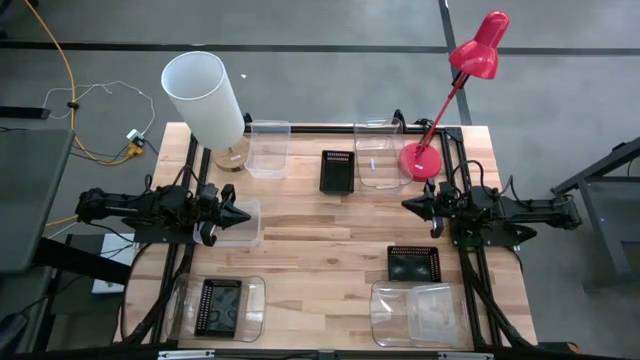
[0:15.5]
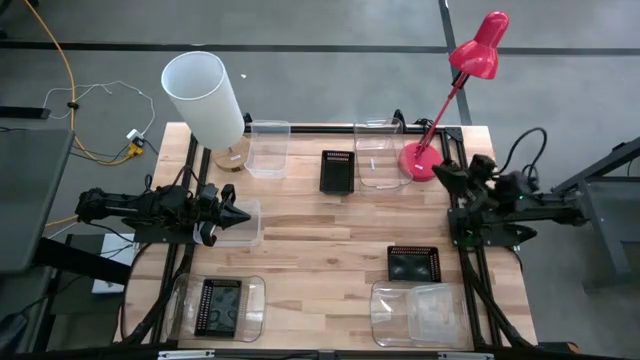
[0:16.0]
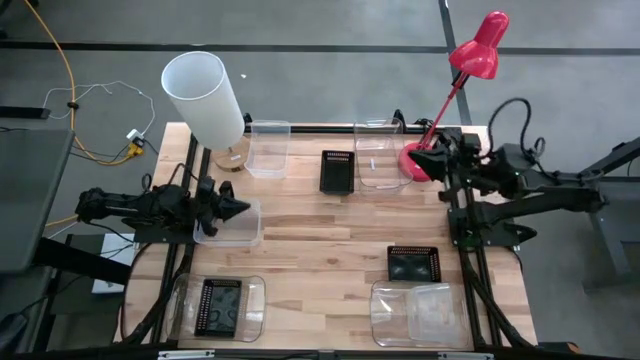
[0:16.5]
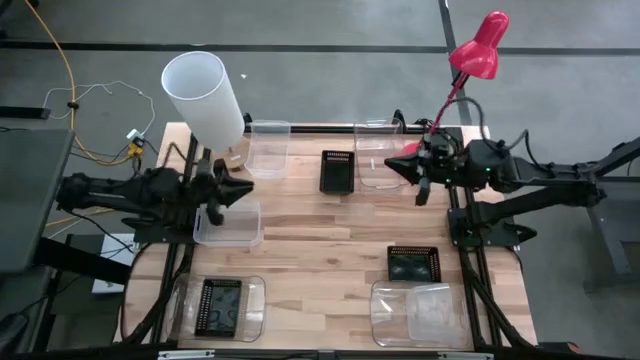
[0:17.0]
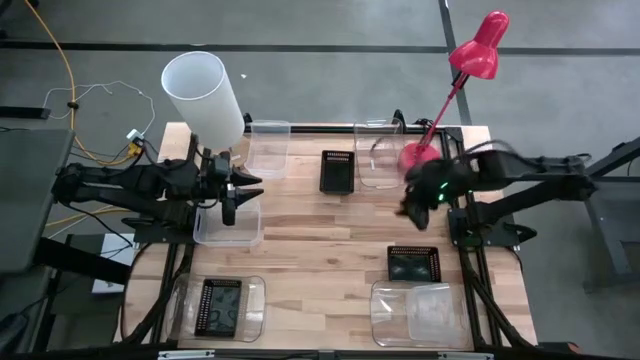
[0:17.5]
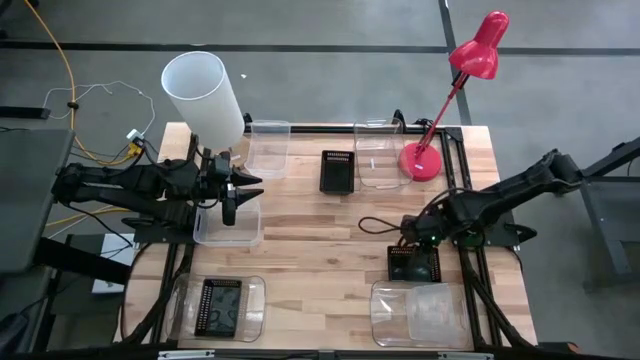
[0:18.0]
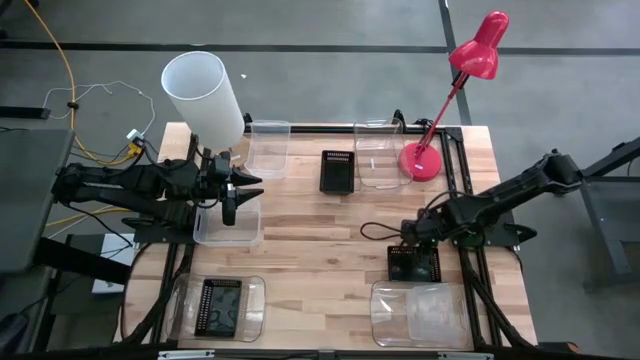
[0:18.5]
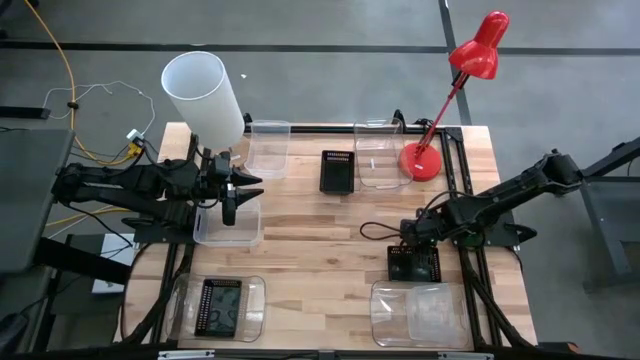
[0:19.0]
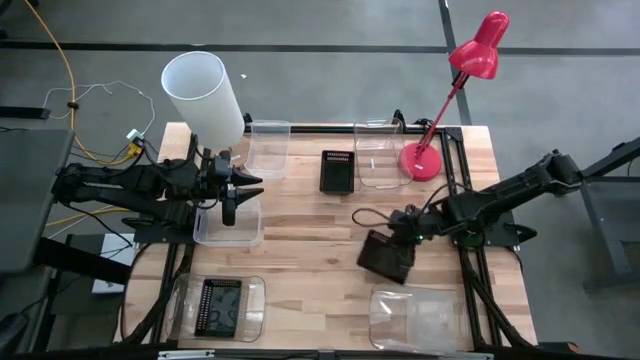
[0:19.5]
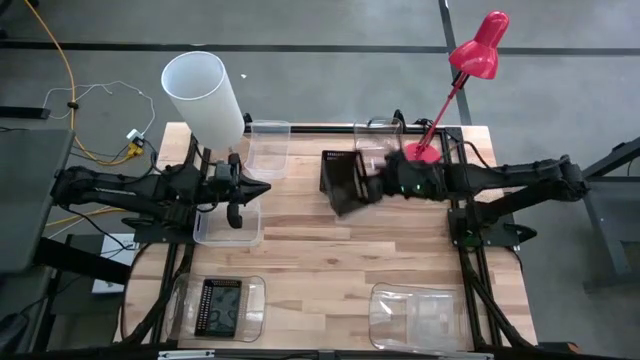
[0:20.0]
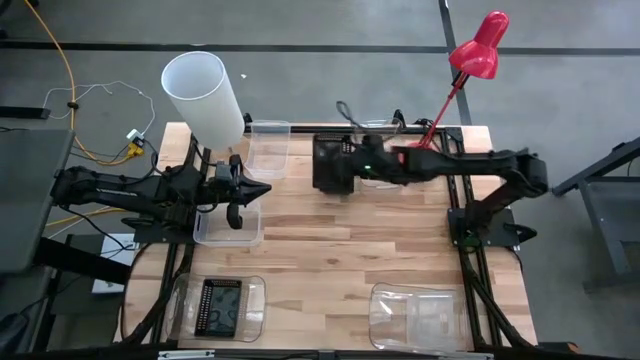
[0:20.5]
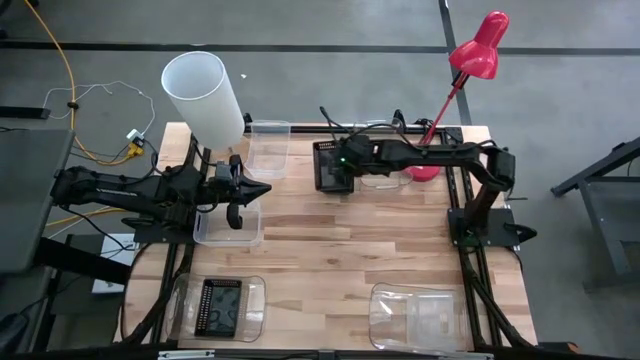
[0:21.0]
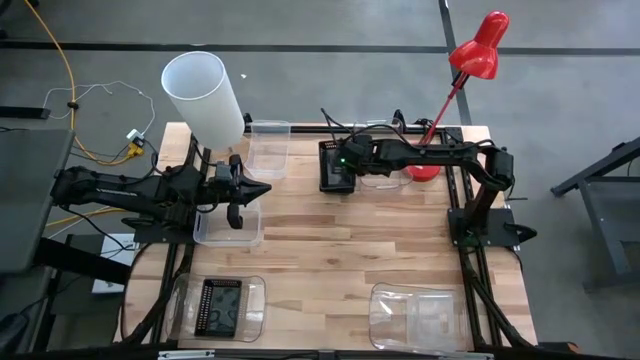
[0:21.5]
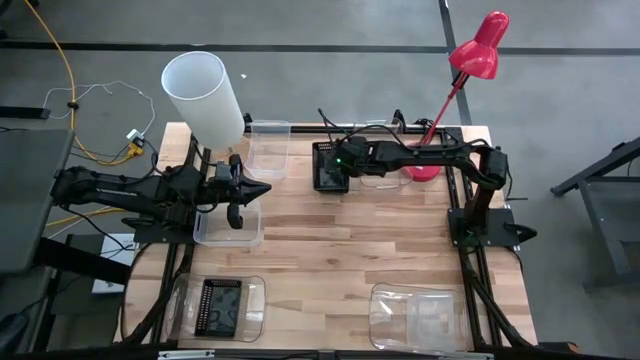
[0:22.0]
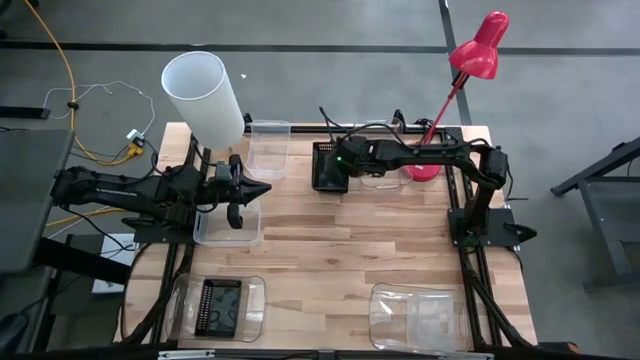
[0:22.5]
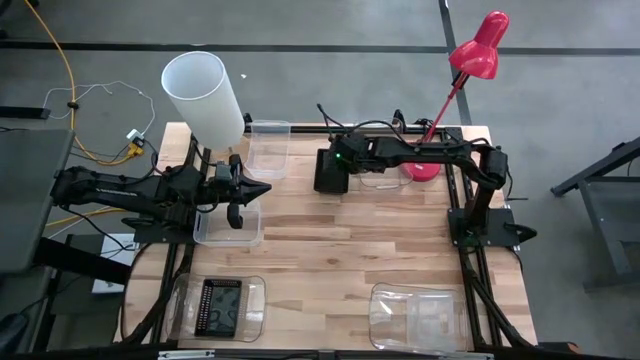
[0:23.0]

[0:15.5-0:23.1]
Stack the right black bin on the top black bin

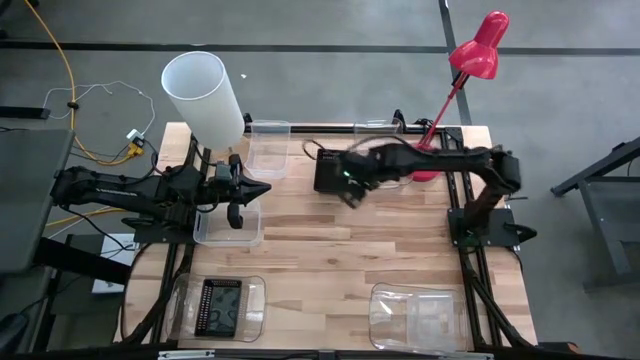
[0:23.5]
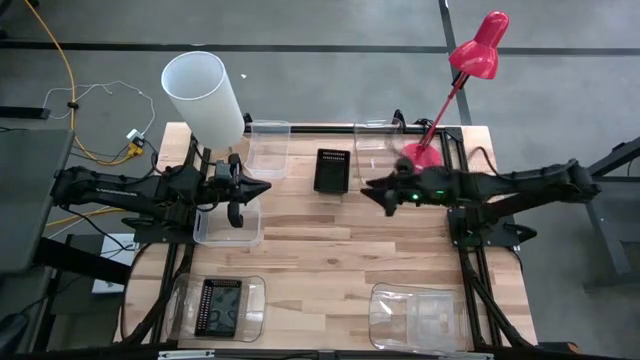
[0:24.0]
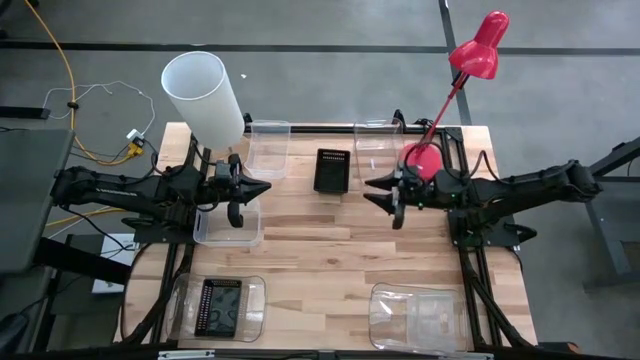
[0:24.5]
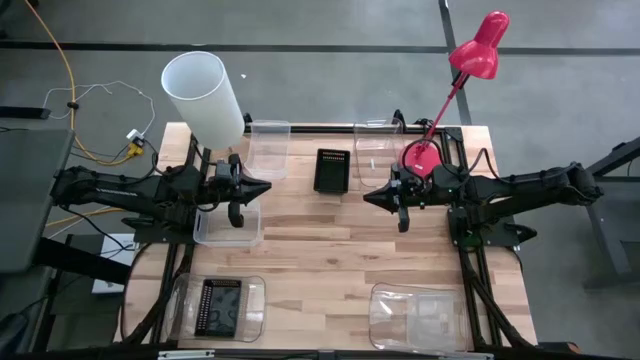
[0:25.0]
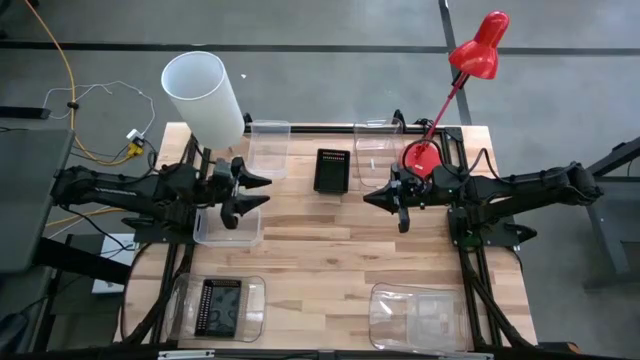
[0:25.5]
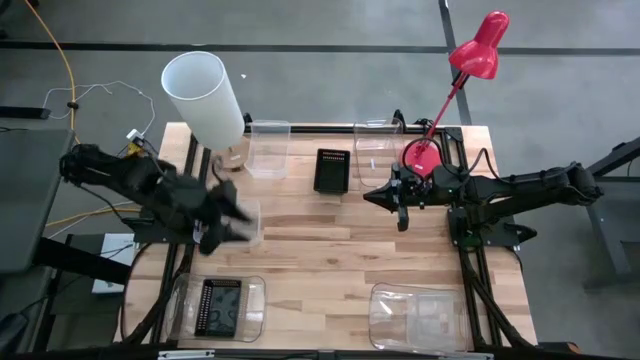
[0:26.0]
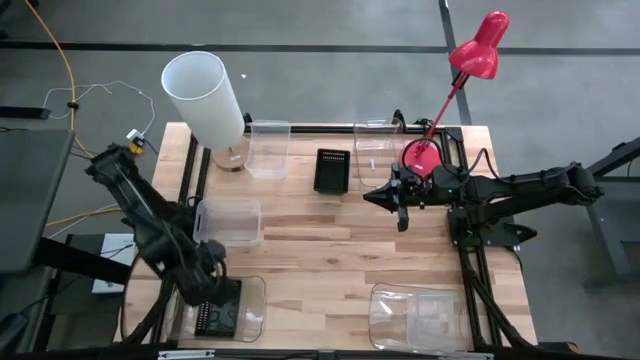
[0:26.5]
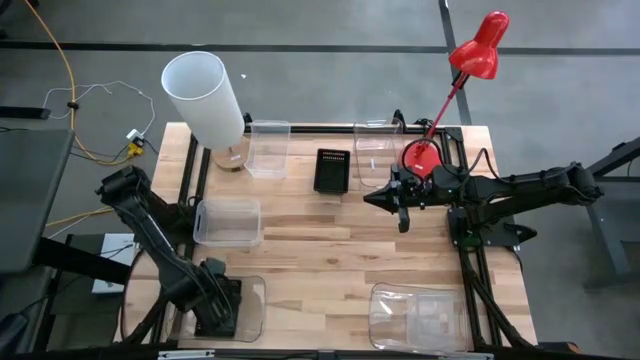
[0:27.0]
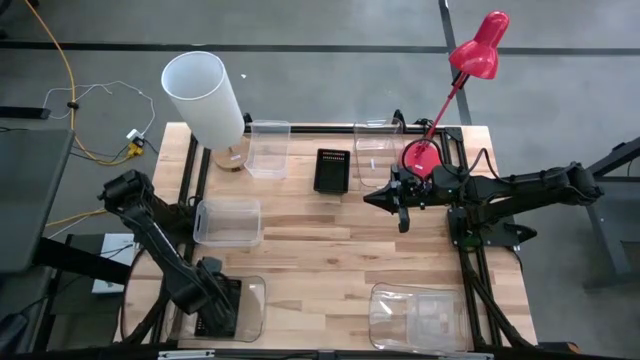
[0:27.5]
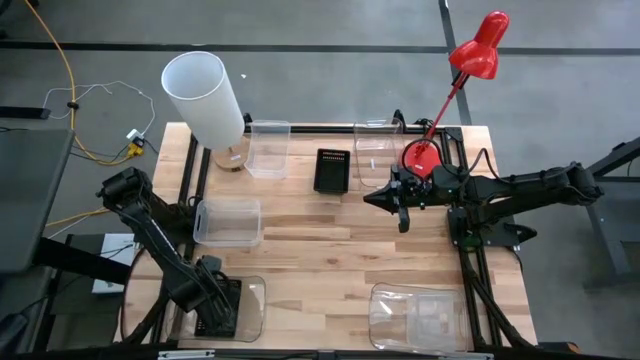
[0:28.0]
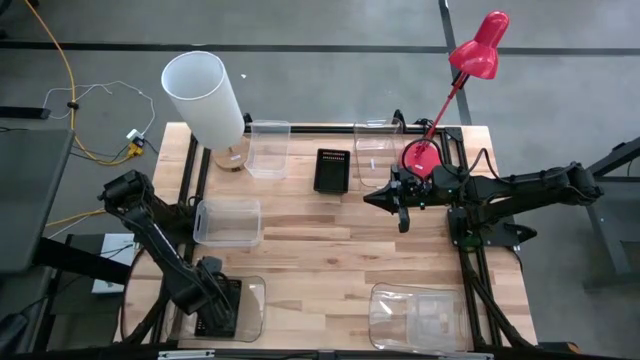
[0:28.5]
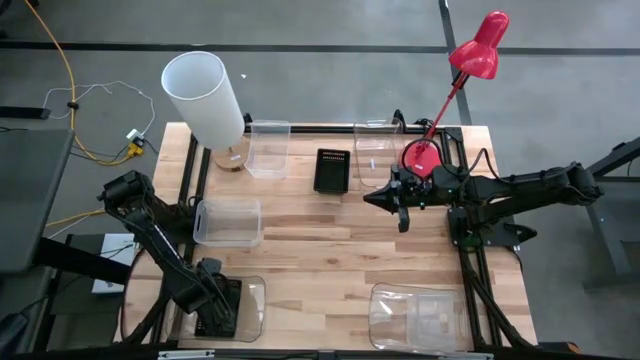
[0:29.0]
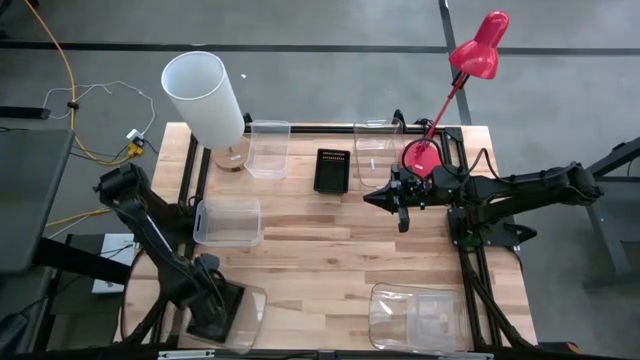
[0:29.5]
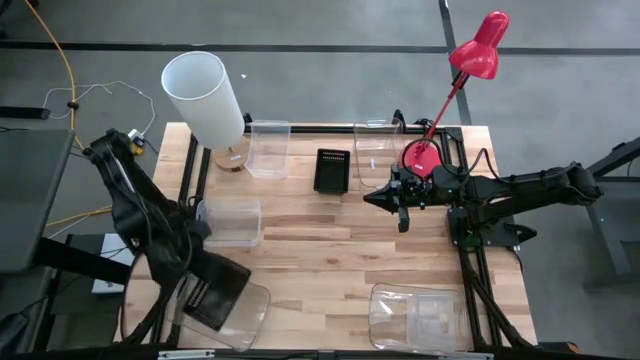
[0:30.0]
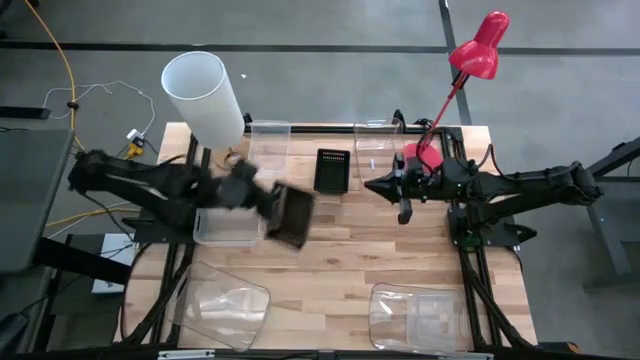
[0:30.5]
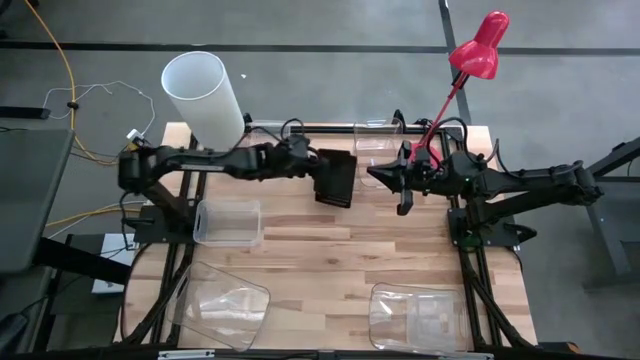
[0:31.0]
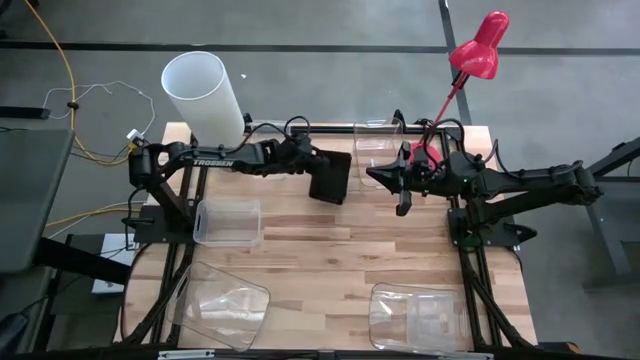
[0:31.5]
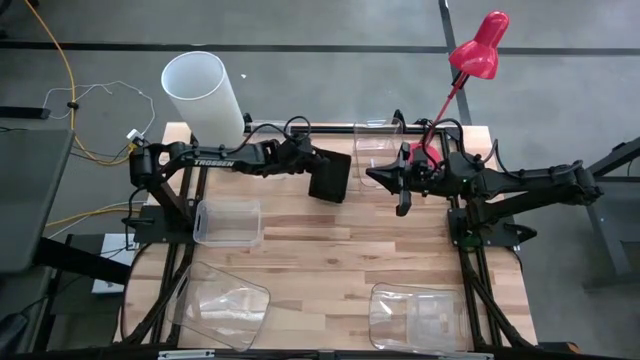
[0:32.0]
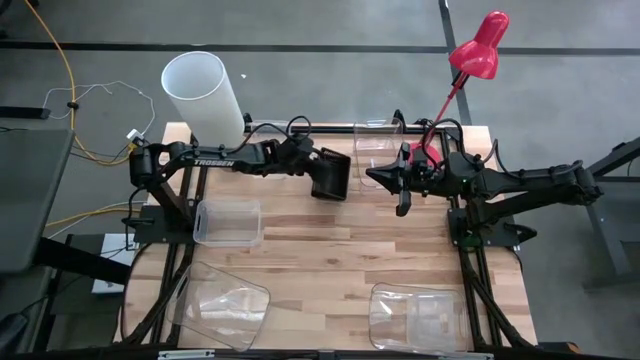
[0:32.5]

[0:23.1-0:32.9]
Stack the bottom black bin on the top black bin
